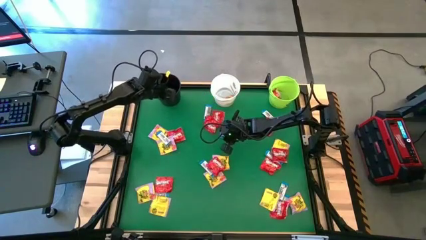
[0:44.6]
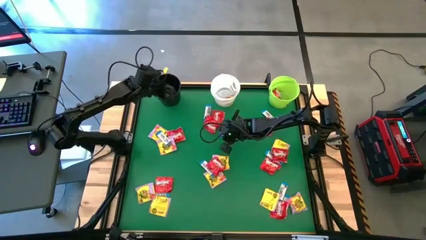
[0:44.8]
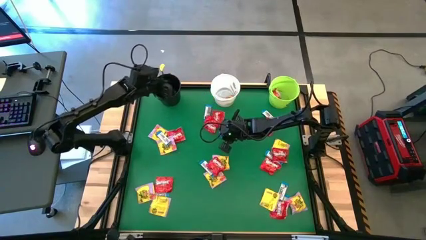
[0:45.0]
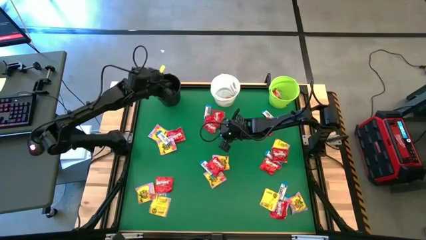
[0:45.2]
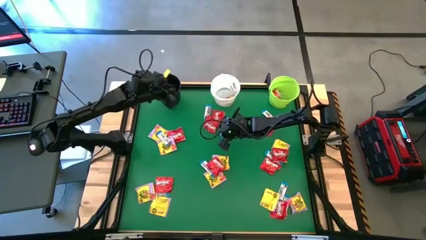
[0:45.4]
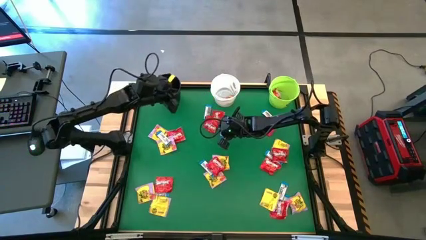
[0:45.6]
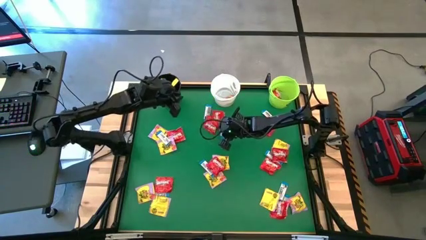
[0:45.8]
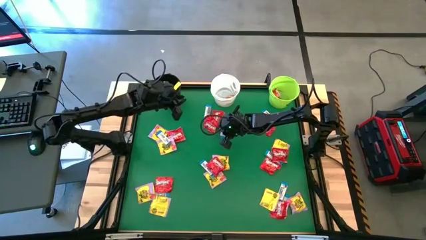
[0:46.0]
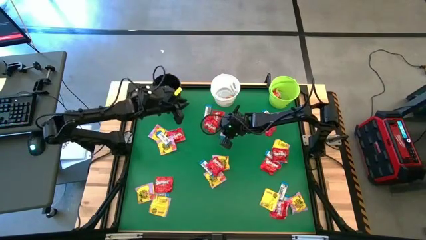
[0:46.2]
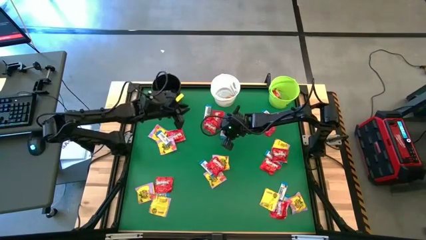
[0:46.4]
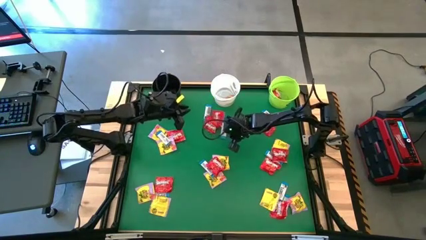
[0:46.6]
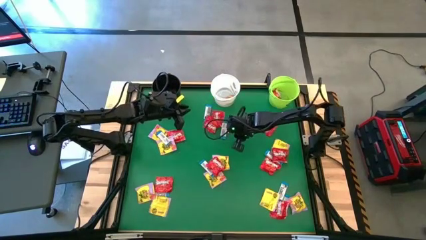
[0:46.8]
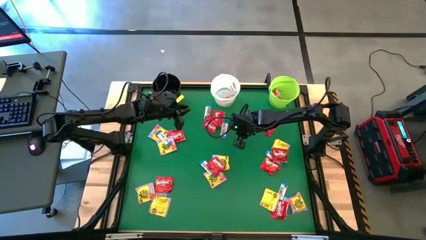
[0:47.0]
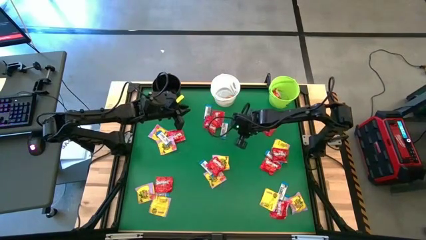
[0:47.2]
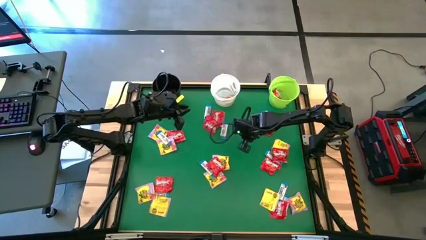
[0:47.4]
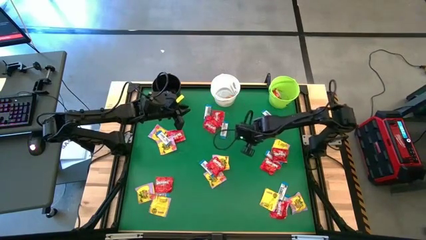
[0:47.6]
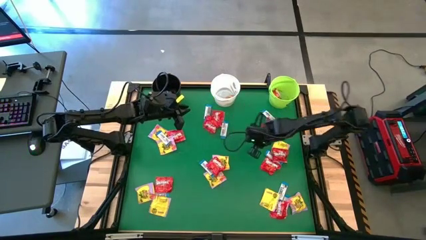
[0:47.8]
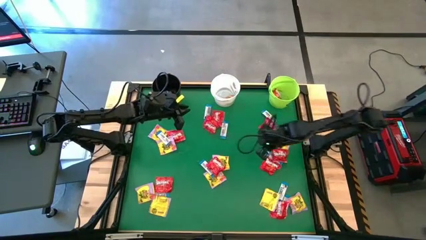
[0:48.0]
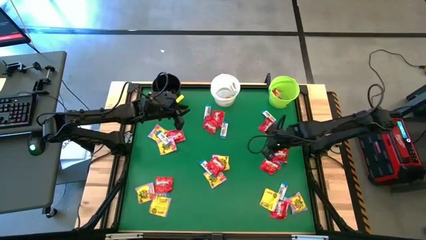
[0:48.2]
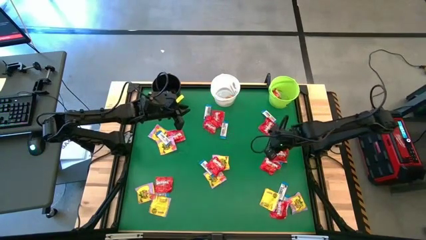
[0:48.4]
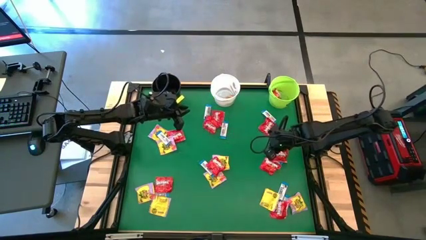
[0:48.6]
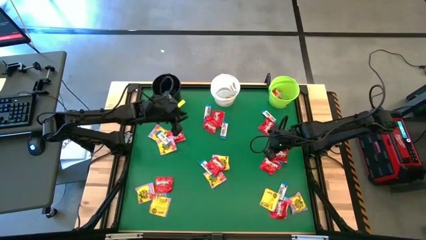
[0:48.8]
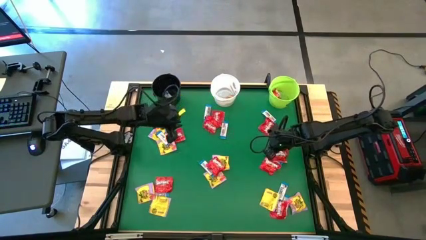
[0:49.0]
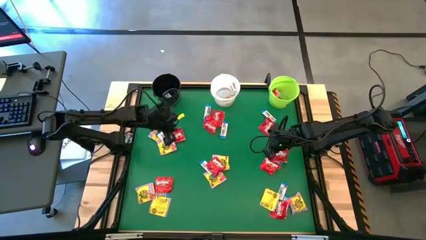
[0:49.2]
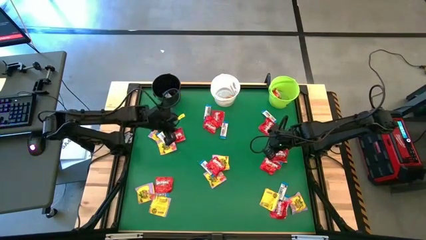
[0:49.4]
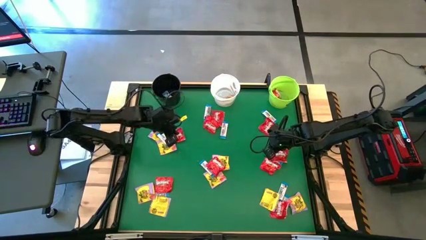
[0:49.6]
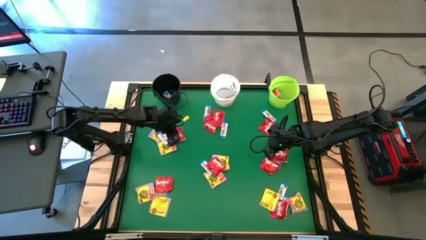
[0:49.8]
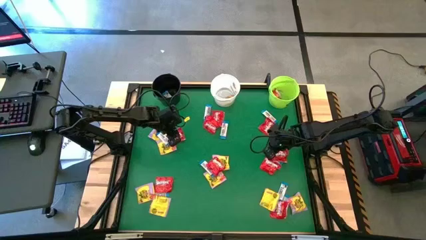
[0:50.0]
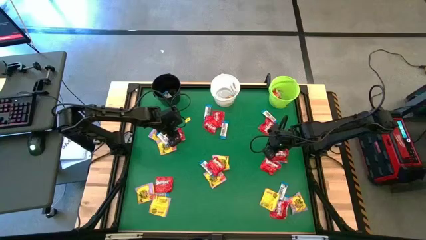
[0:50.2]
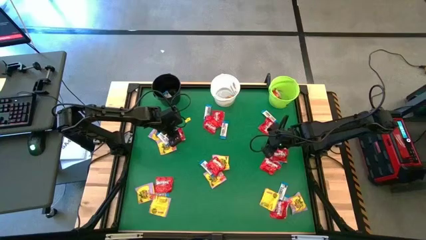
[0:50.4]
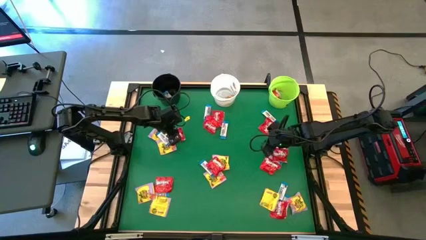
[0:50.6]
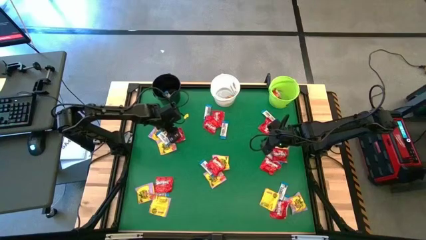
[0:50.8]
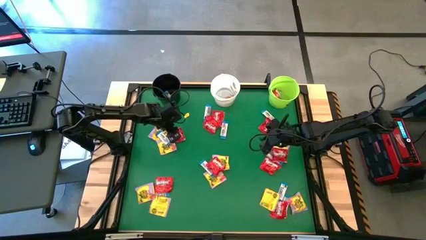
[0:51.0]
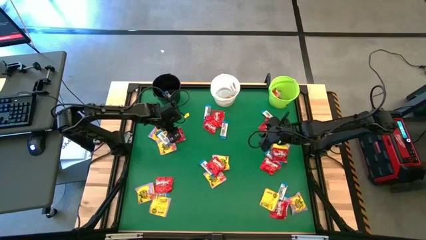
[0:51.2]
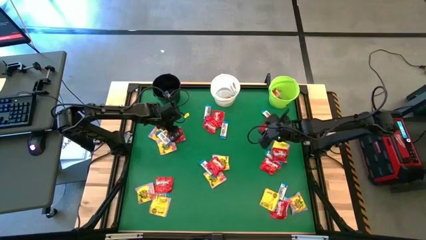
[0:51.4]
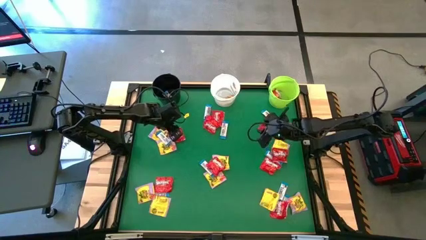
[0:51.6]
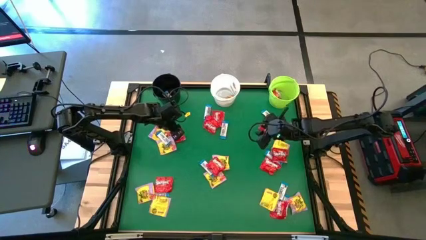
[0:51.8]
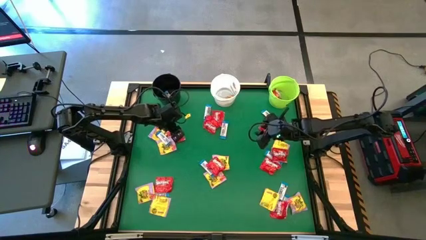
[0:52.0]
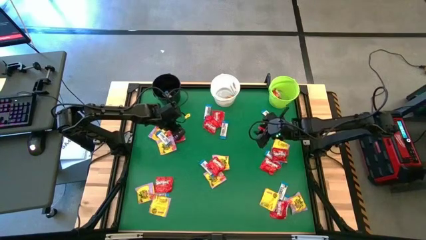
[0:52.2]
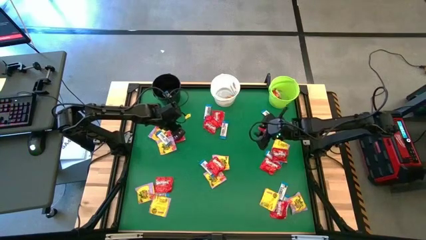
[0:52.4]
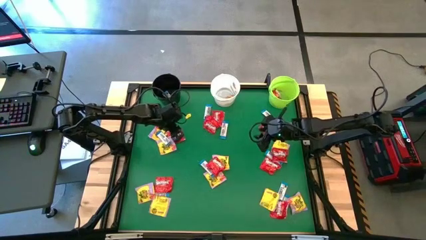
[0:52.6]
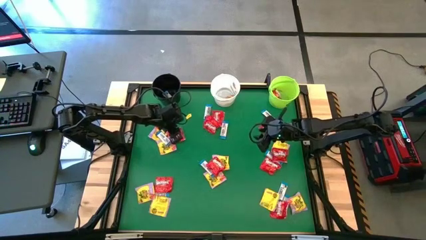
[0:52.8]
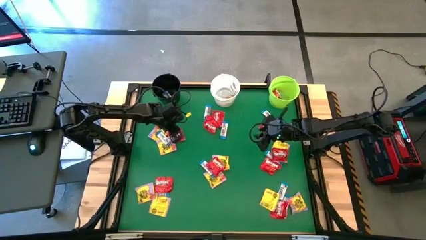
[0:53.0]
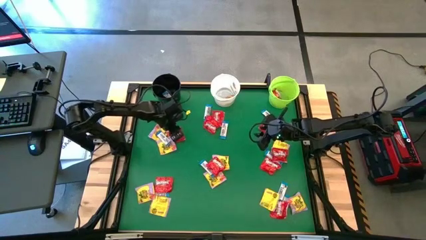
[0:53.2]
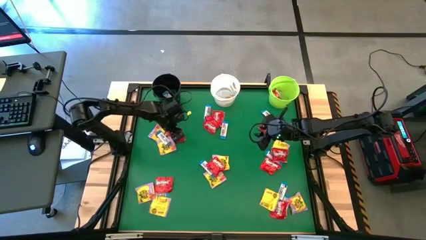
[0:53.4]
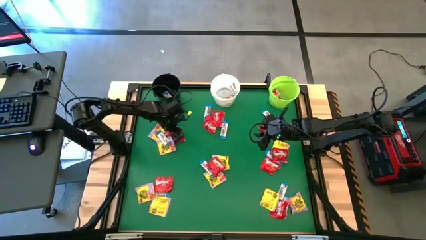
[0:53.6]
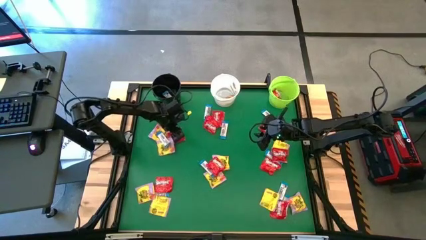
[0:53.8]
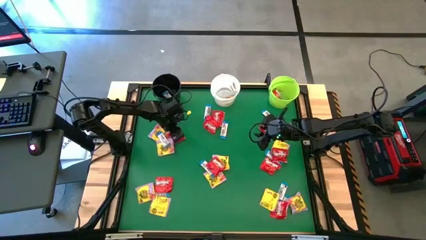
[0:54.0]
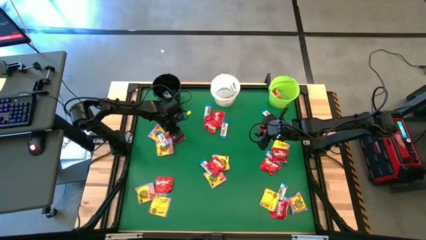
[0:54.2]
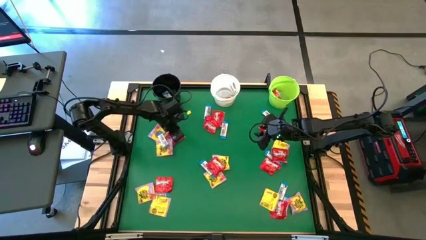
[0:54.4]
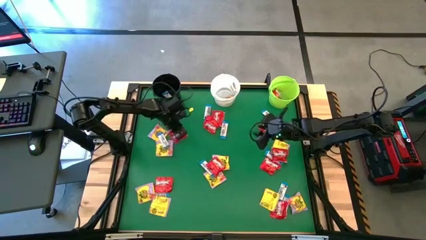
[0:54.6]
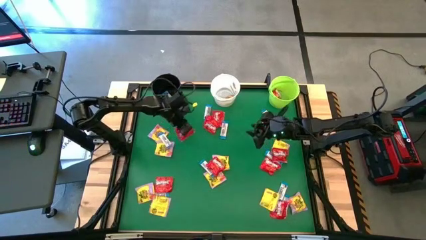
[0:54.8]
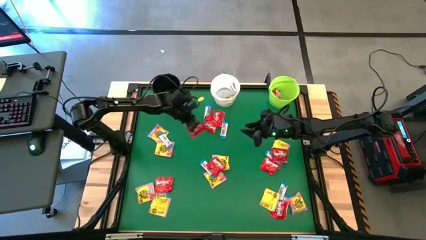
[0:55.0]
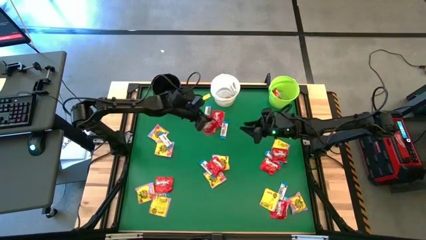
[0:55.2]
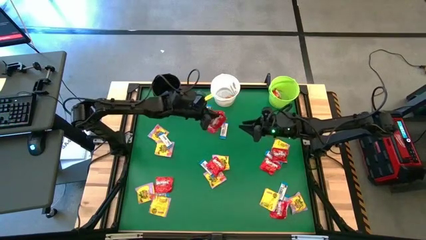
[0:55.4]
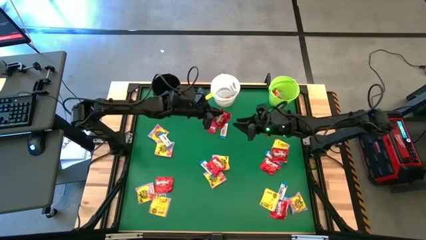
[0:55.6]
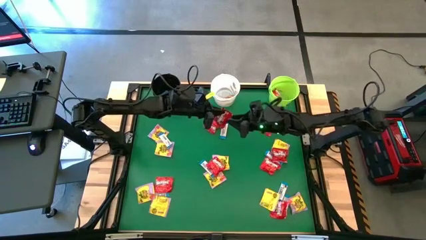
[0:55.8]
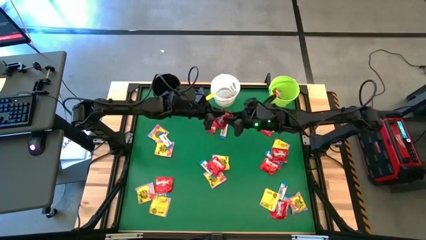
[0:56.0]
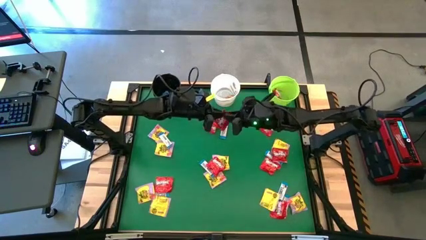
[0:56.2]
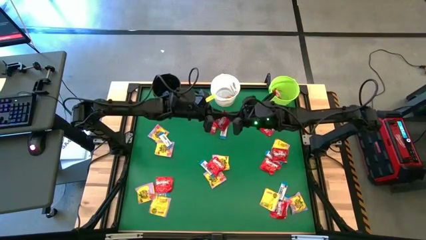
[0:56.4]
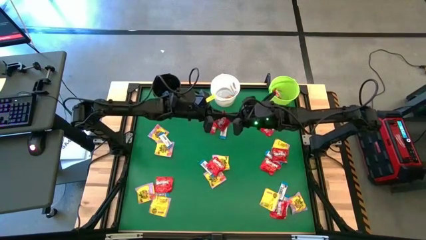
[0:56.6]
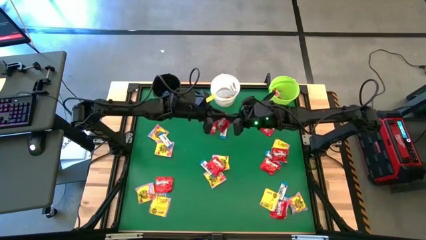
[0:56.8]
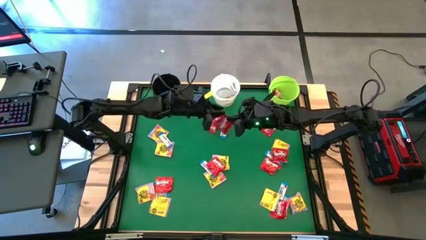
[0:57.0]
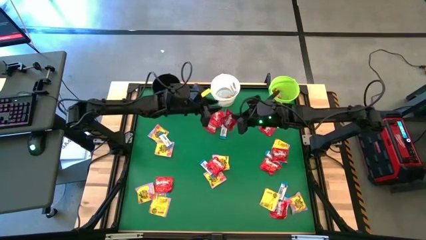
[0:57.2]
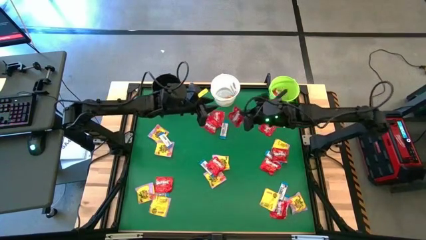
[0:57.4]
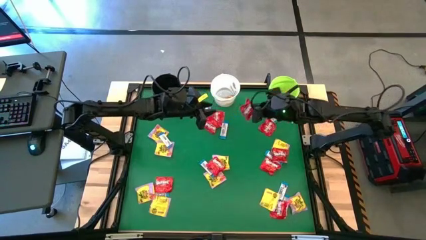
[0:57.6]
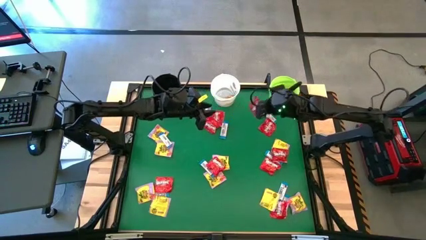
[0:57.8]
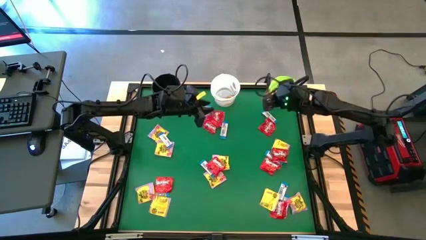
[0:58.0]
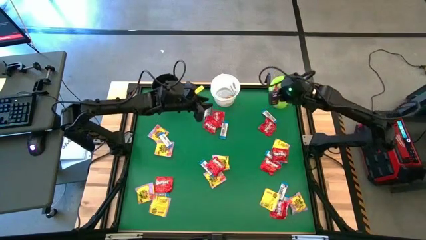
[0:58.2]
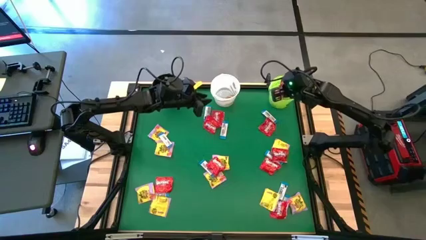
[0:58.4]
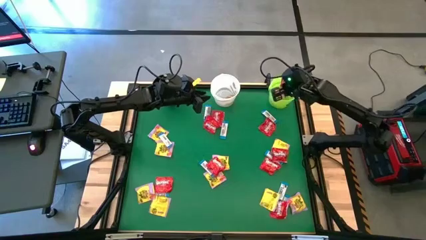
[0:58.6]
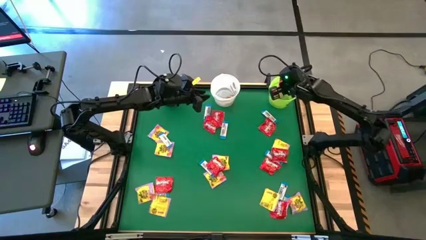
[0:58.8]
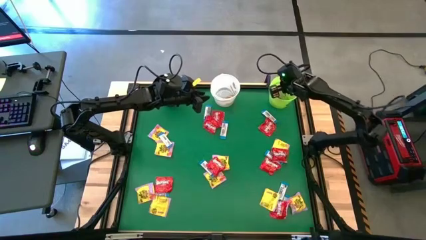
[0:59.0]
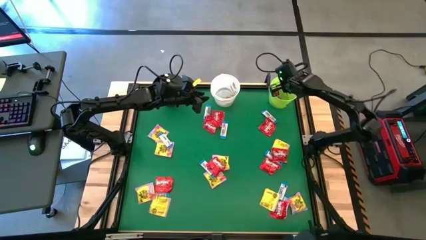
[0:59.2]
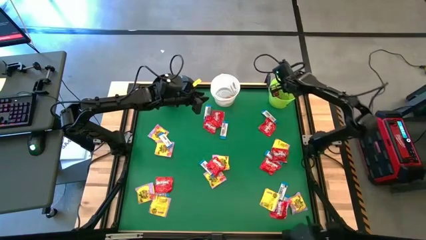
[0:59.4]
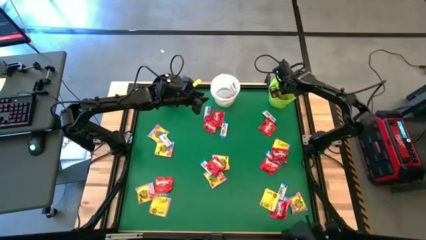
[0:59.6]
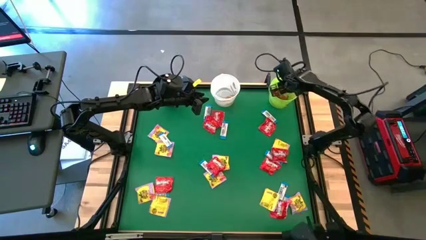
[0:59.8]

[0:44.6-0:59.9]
Task: Sort candy by brand, put in halloween buckets
Put the red candy into the green bucket

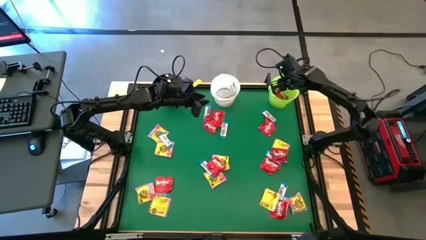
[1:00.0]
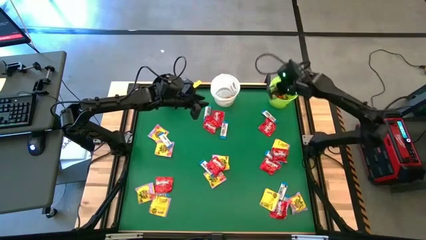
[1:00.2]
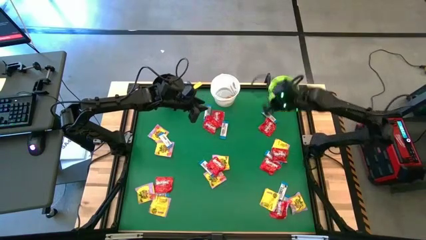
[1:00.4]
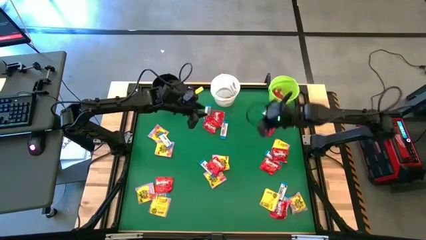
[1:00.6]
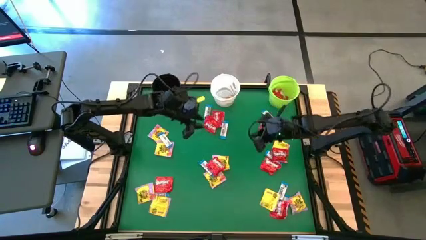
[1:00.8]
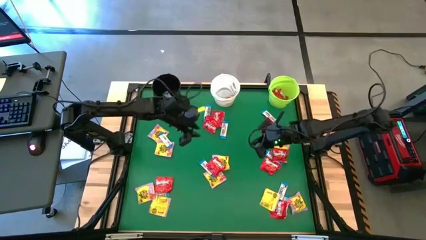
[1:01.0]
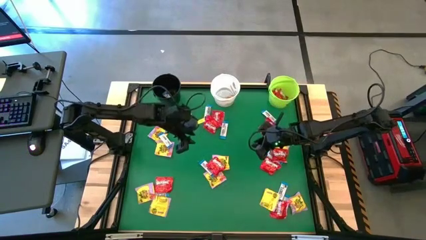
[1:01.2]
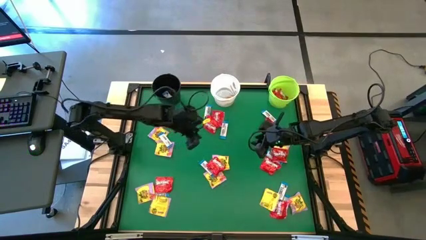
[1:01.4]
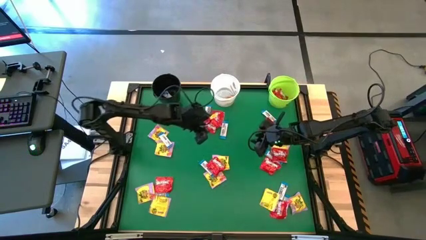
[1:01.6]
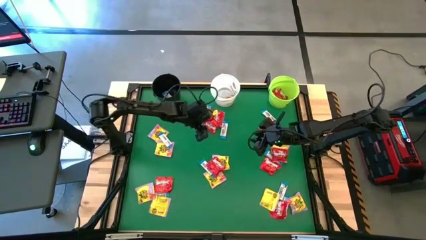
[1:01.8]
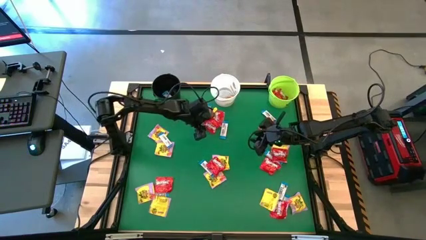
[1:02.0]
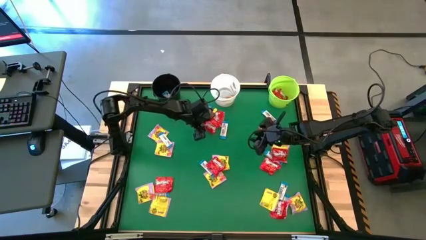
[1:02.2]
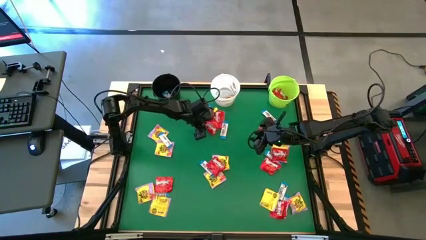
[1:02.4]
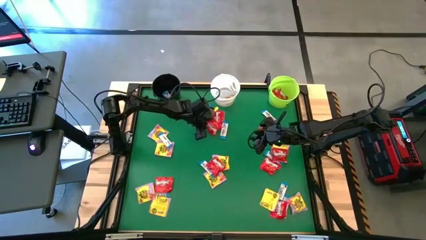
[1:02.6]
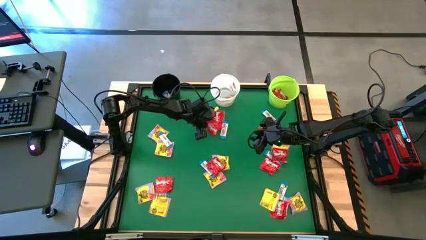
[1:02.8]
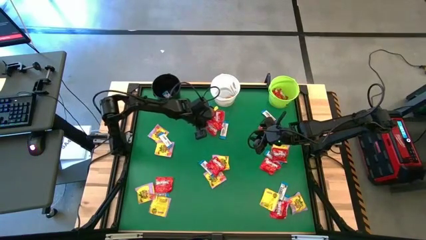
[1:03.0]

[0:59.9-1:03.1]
Put the red candy into the green bucket
